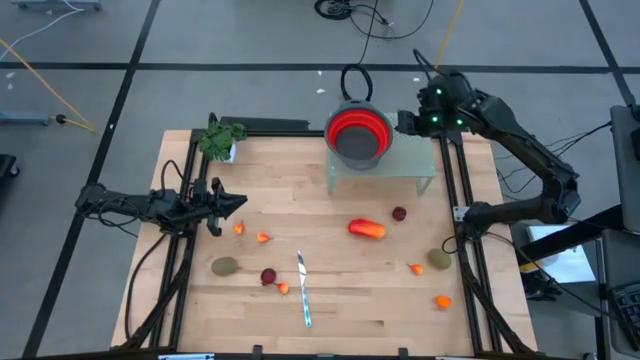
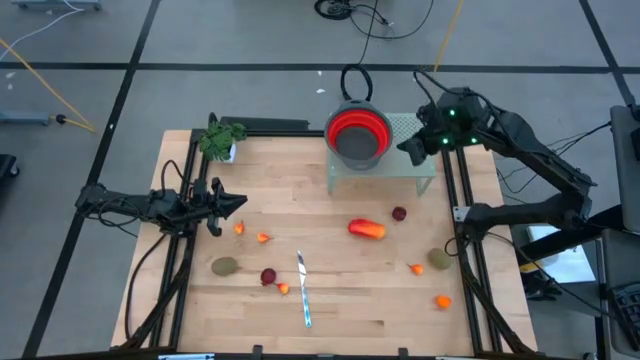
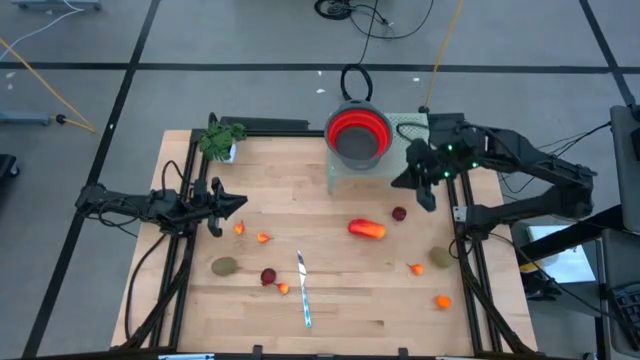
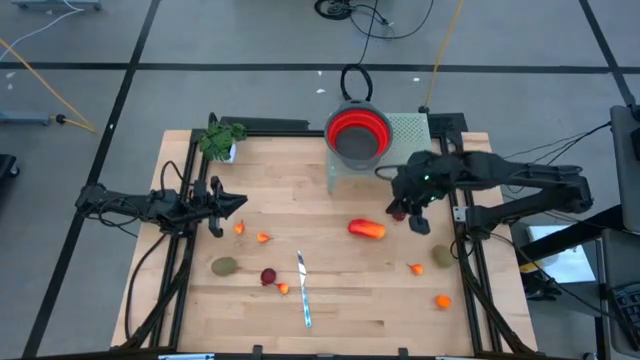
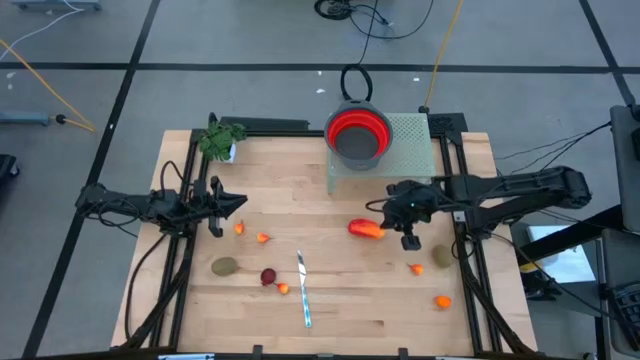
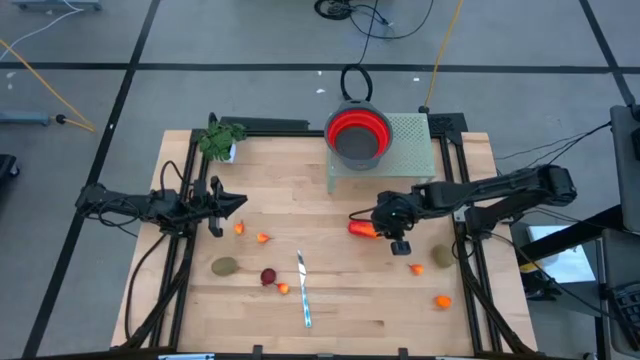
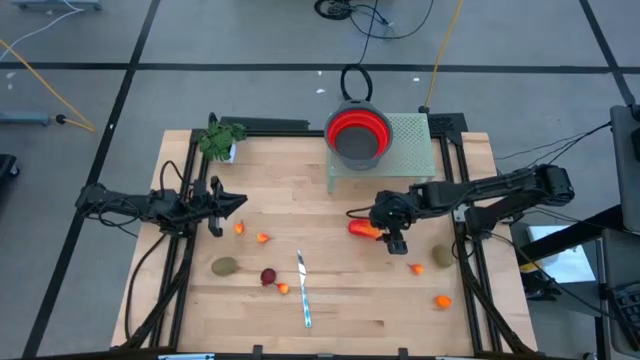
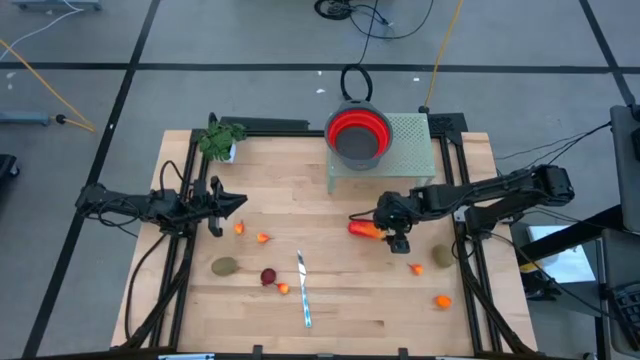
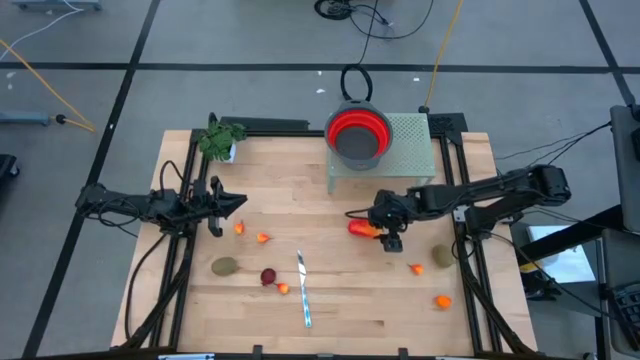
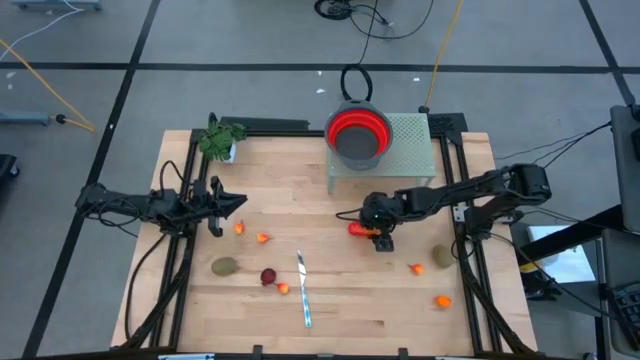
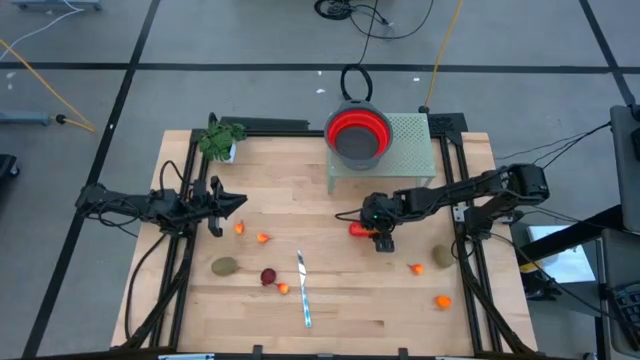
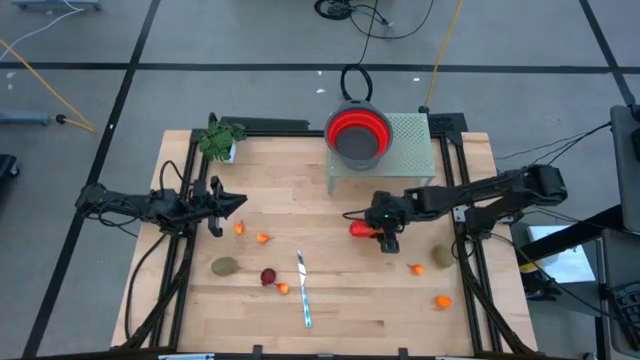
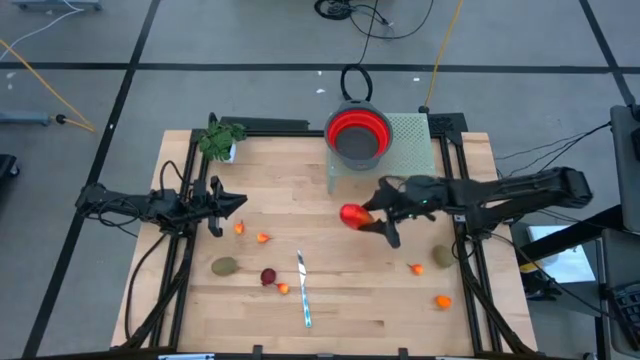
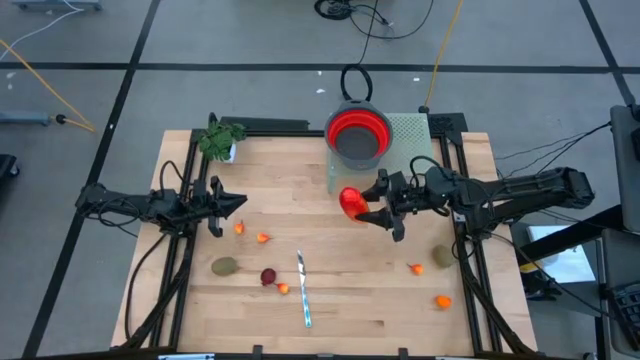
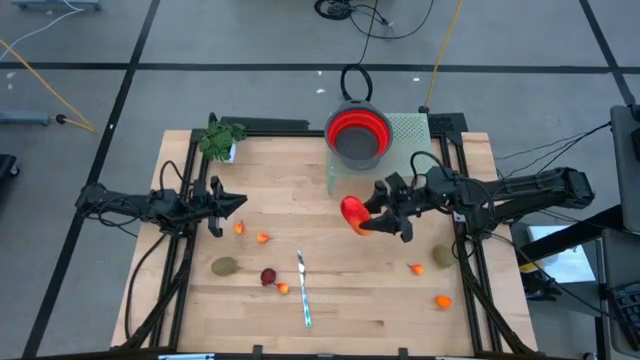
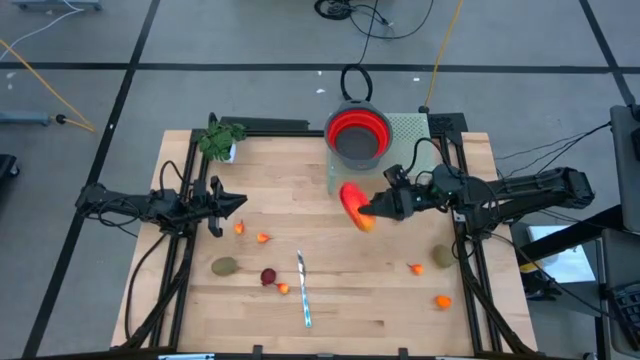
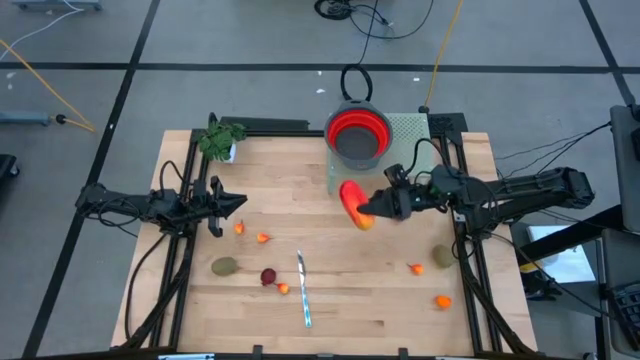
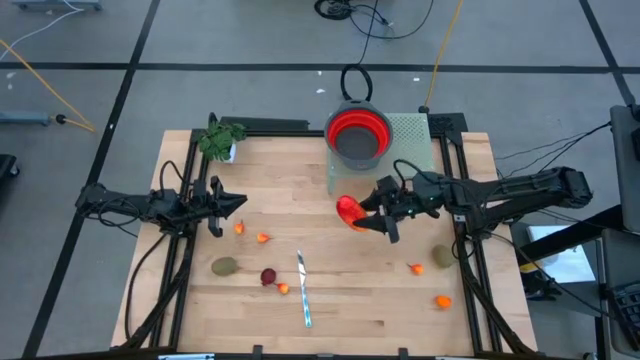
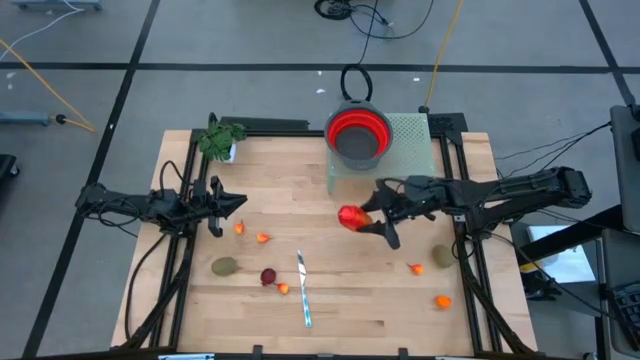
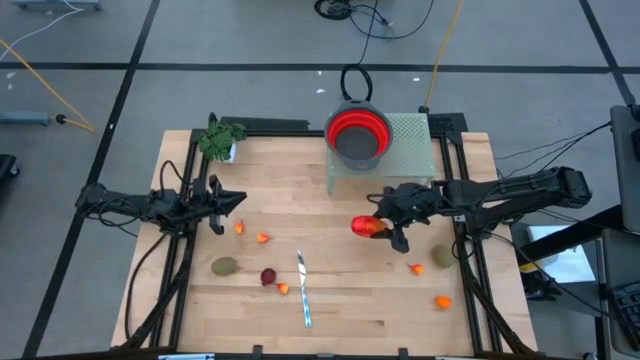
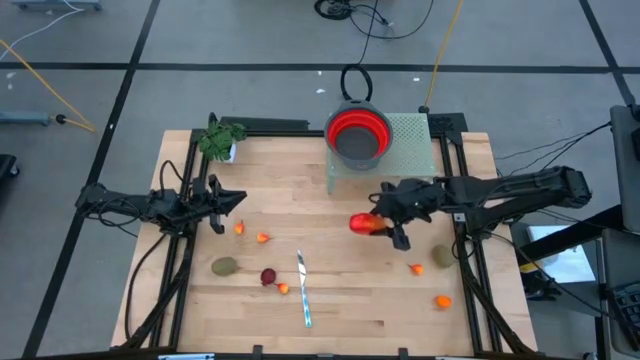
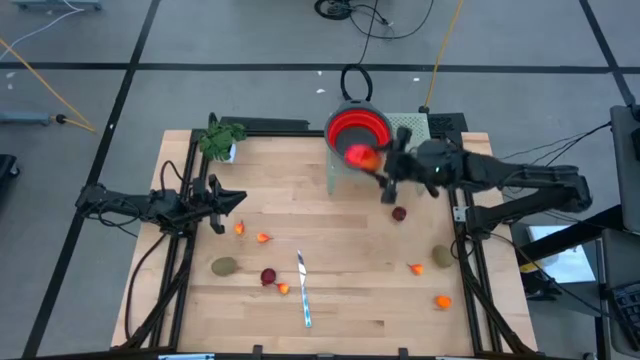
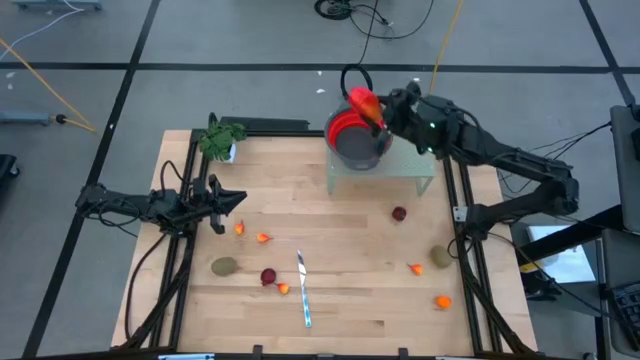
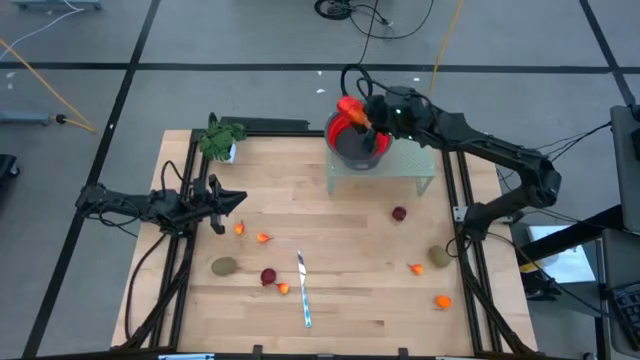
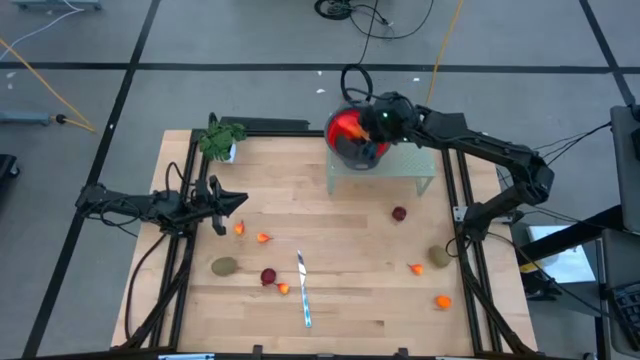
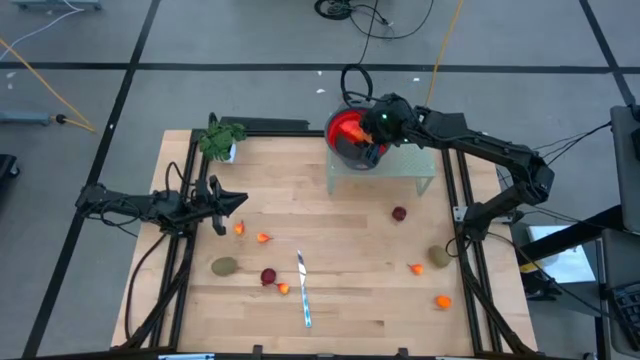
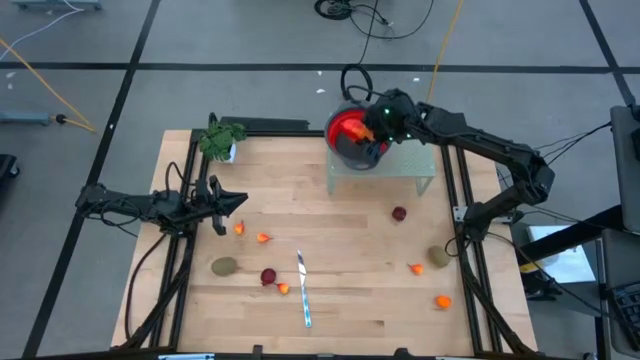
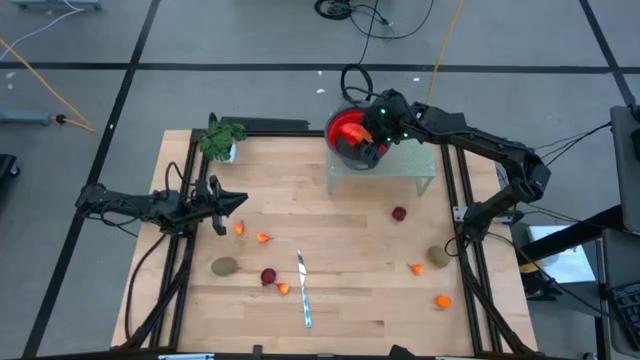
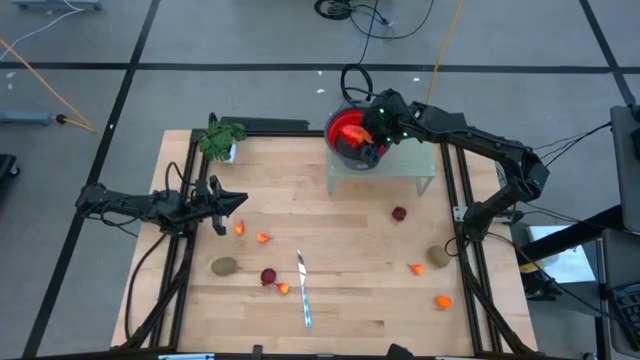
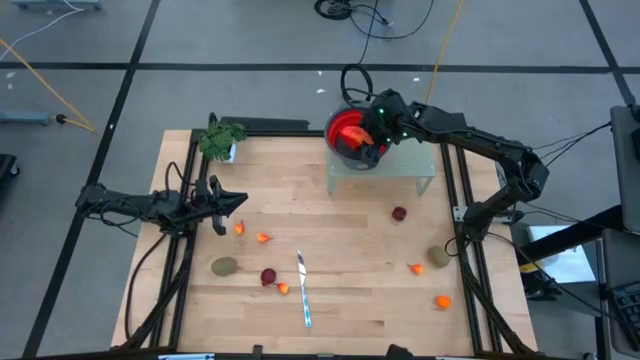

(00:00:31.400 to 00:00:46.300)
Task: Pick & Place Fruit
Put the mango into the red strainer bowl on the shelf

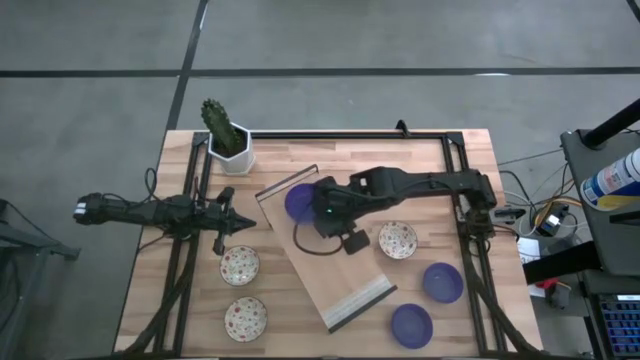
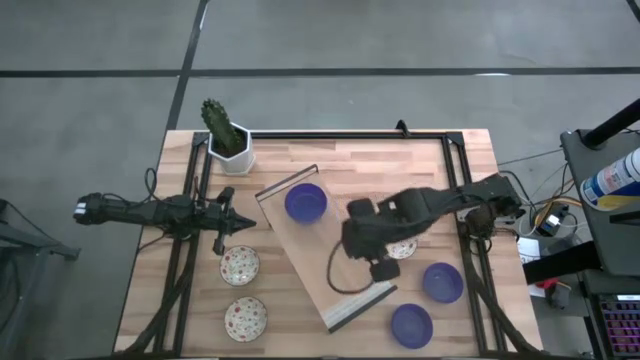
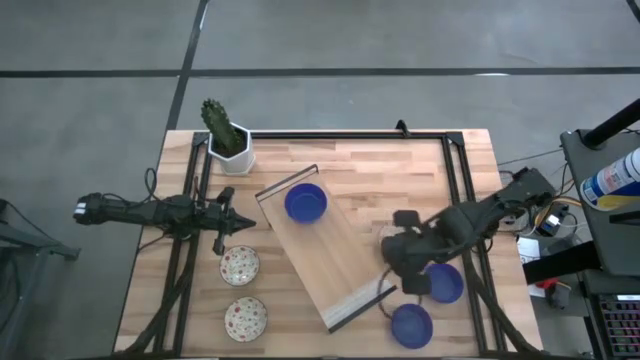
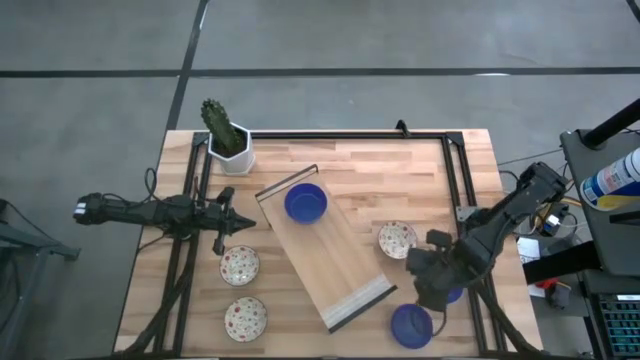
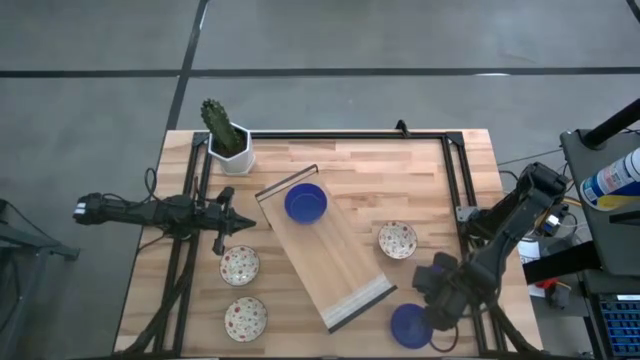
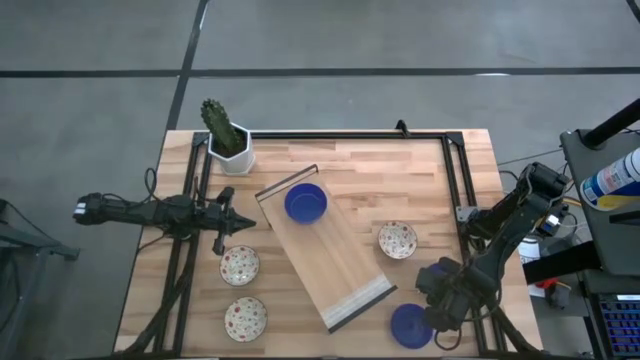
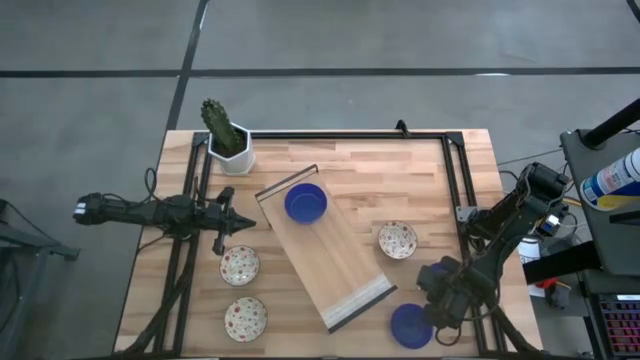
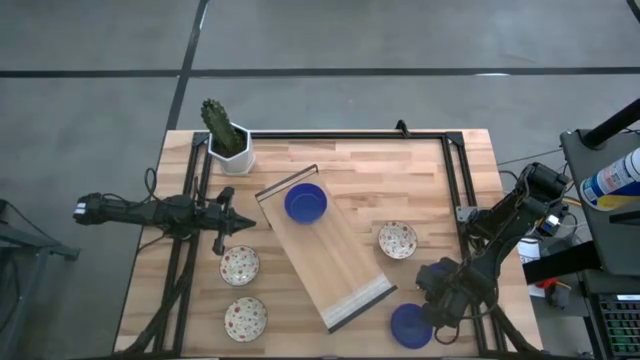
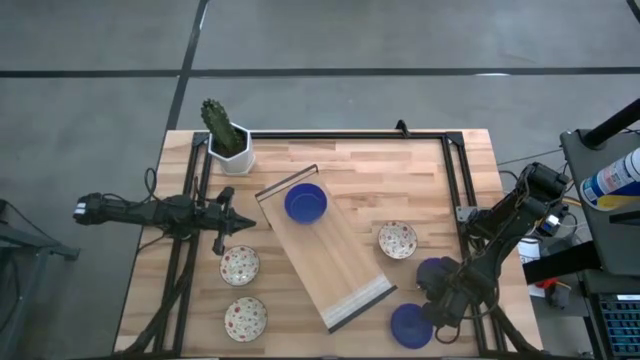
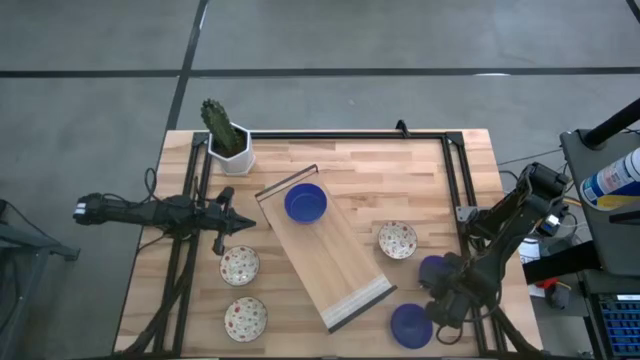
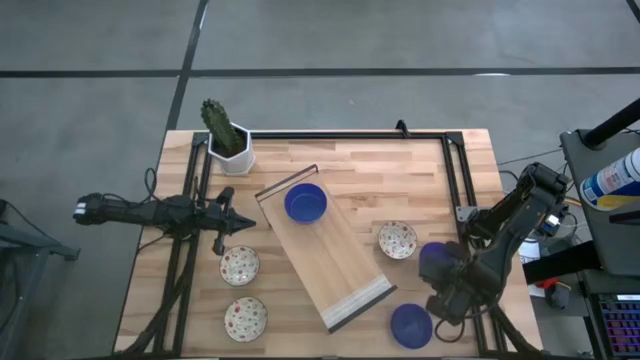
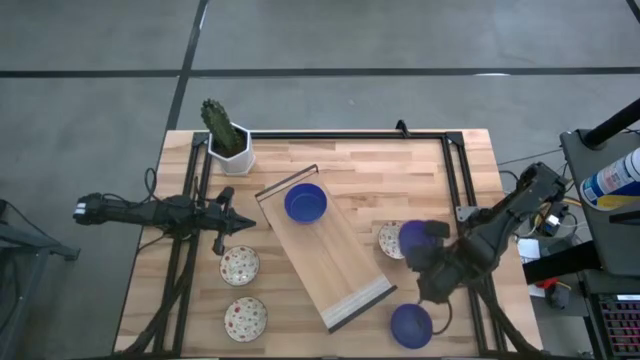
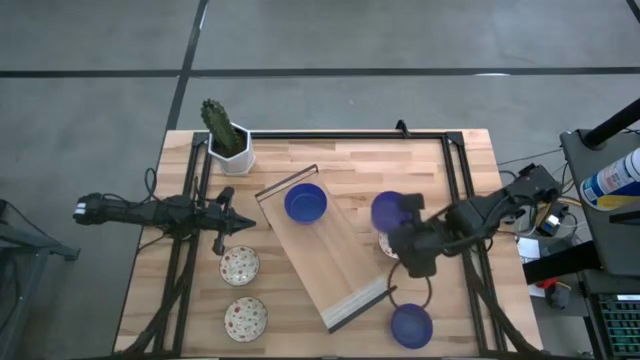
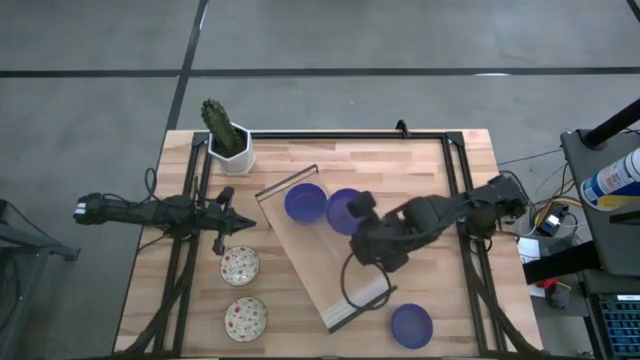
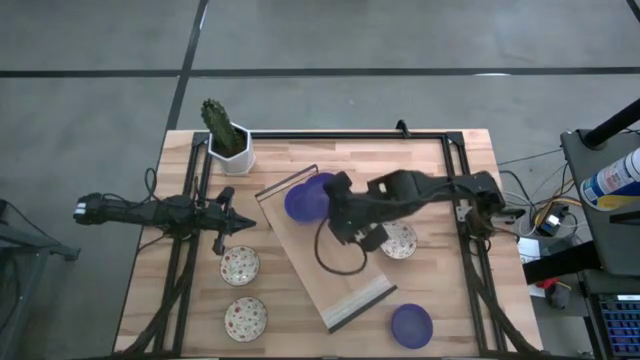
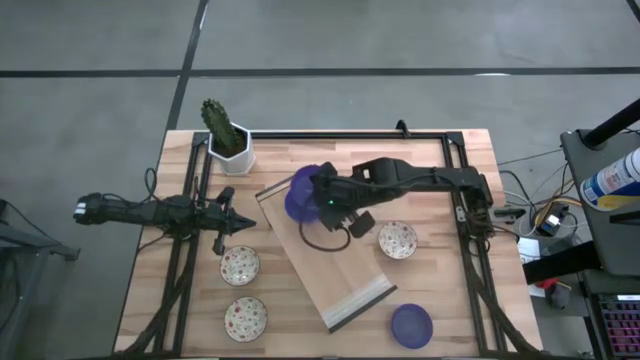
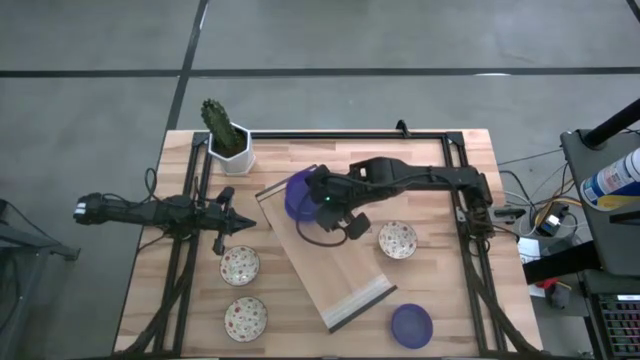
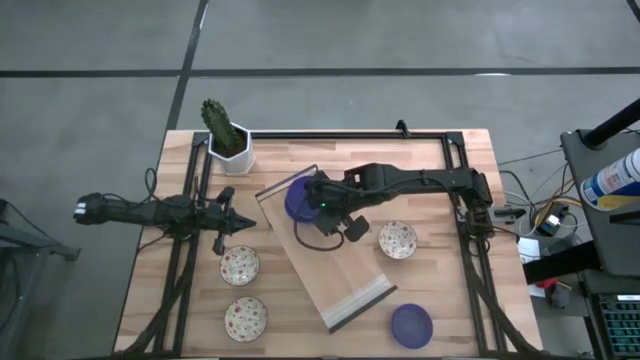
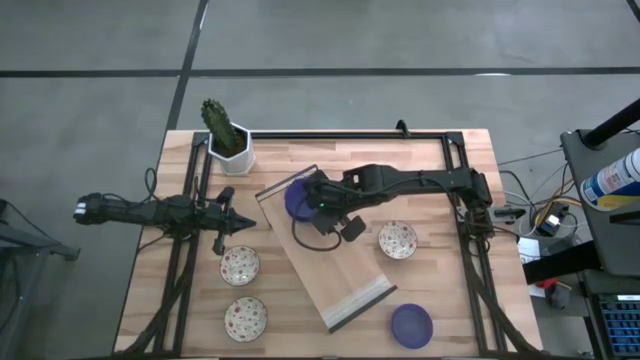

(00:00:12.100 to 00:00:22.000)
Task: Pick & Place Mini bowls
Stack the top blue bowl on the blue bowl on the shelf
